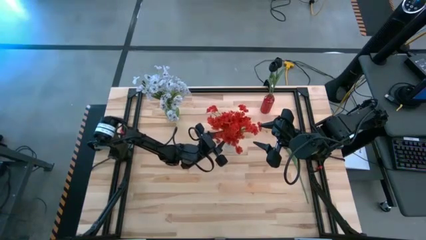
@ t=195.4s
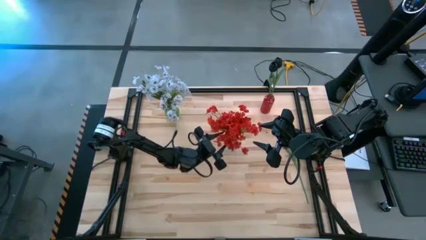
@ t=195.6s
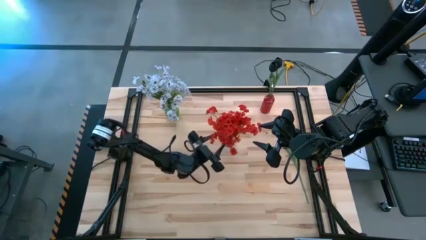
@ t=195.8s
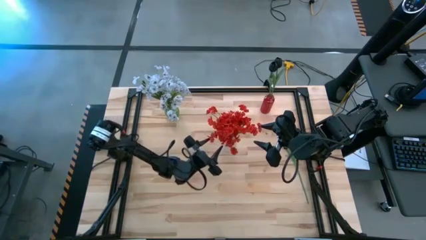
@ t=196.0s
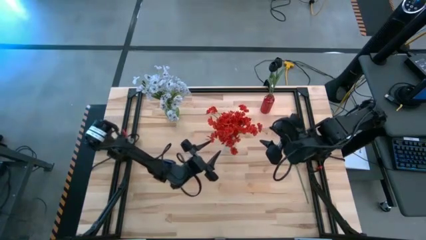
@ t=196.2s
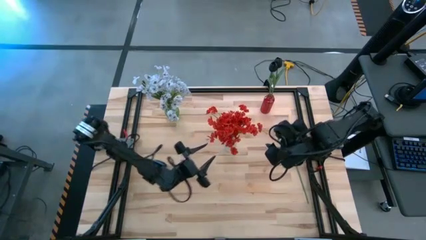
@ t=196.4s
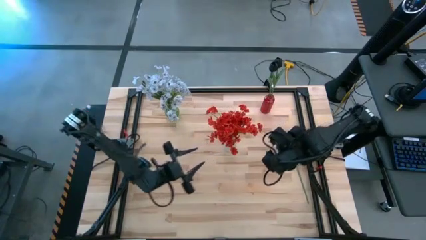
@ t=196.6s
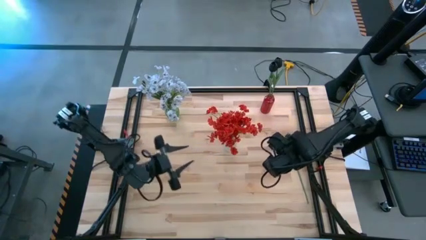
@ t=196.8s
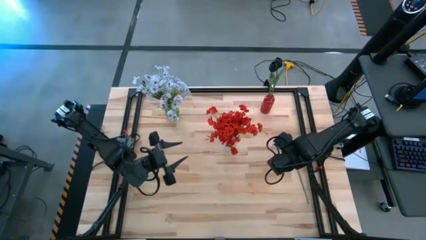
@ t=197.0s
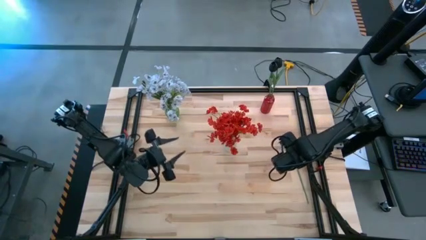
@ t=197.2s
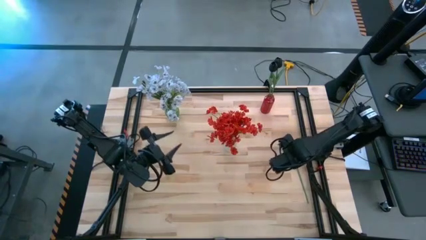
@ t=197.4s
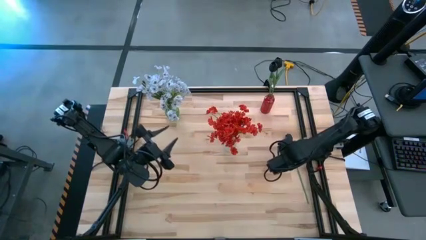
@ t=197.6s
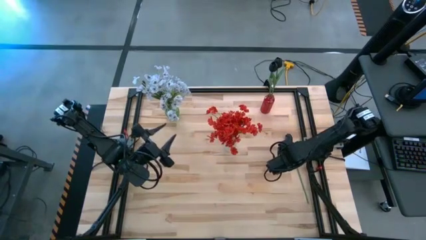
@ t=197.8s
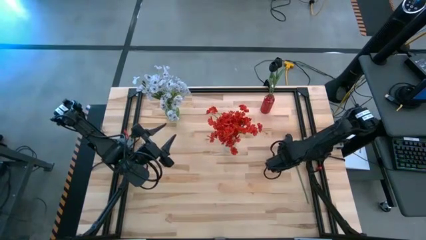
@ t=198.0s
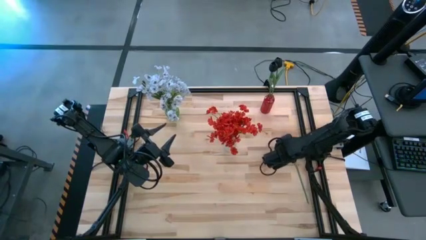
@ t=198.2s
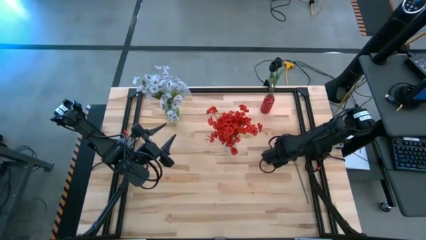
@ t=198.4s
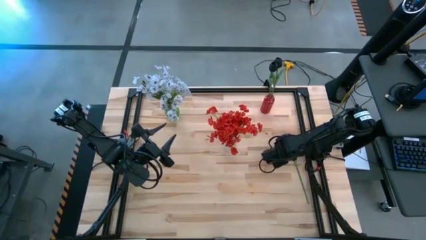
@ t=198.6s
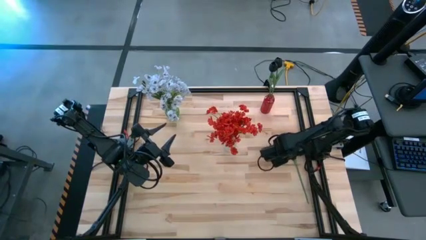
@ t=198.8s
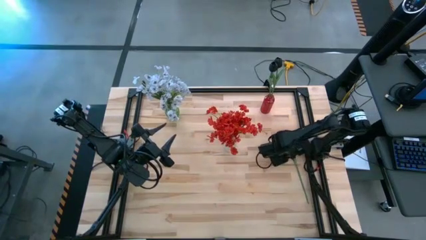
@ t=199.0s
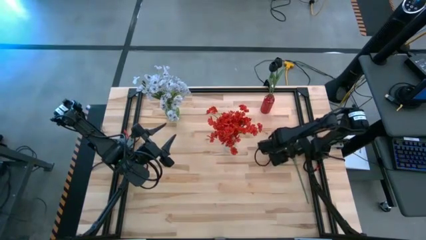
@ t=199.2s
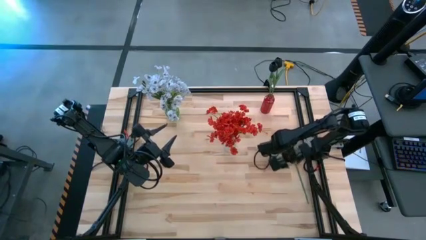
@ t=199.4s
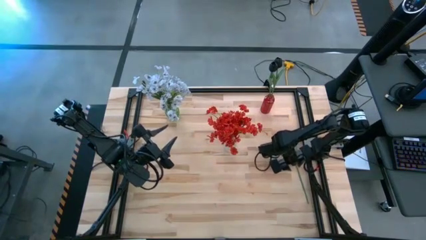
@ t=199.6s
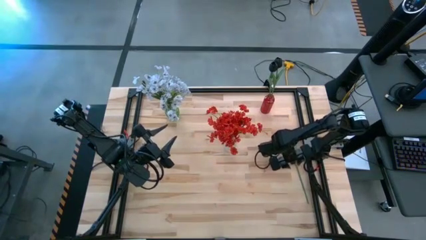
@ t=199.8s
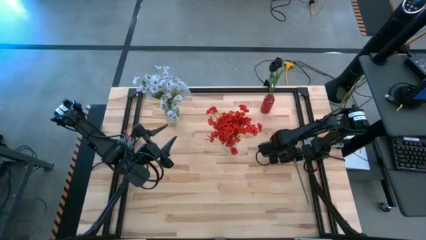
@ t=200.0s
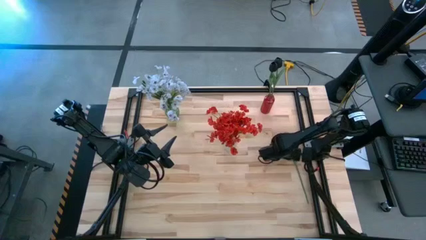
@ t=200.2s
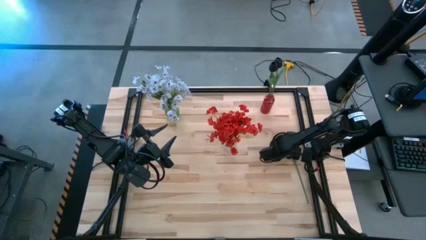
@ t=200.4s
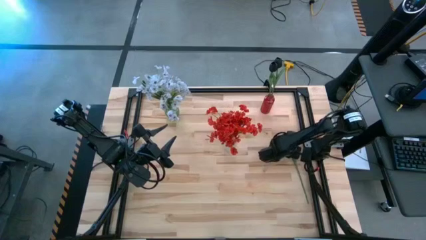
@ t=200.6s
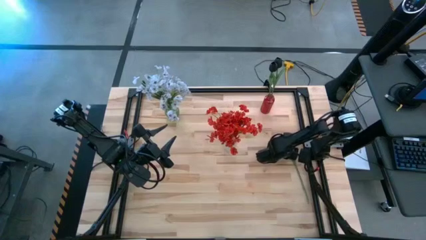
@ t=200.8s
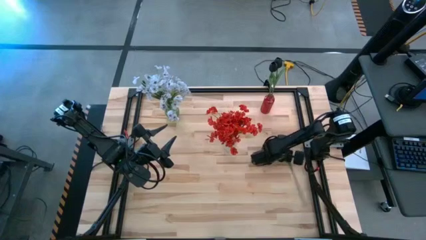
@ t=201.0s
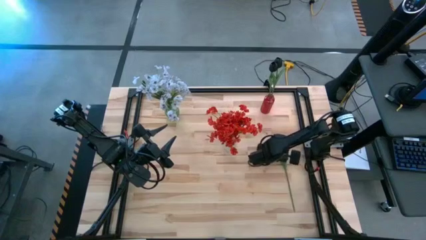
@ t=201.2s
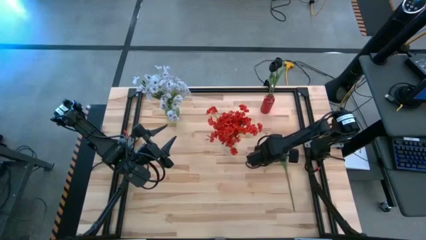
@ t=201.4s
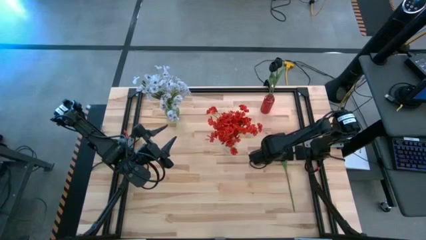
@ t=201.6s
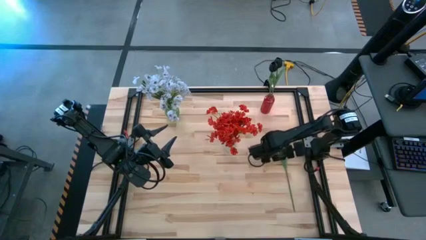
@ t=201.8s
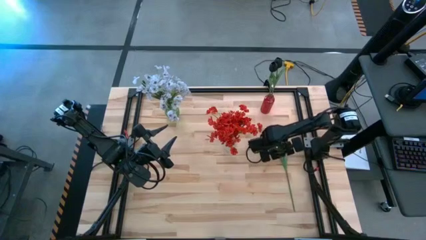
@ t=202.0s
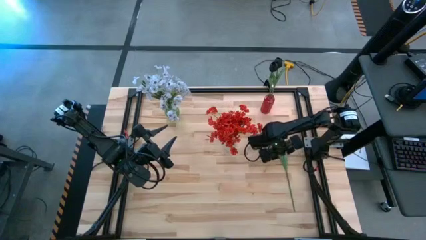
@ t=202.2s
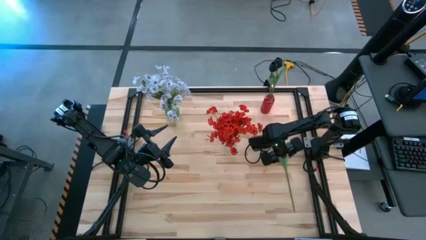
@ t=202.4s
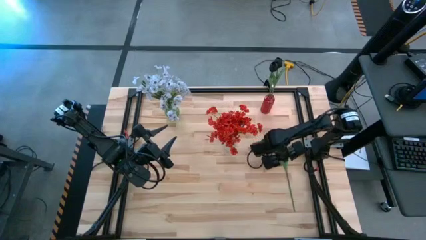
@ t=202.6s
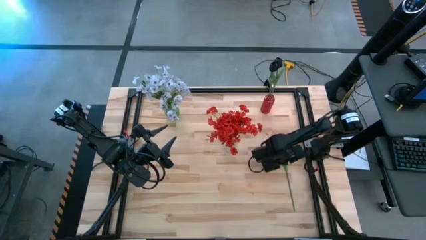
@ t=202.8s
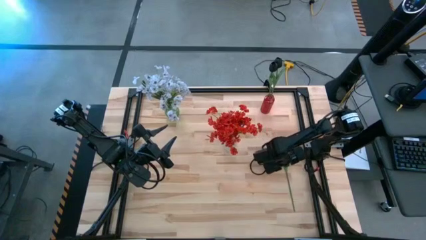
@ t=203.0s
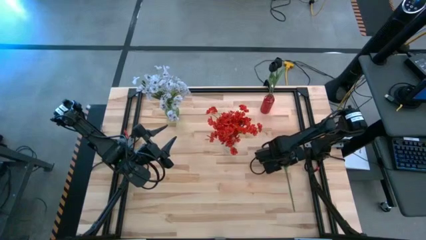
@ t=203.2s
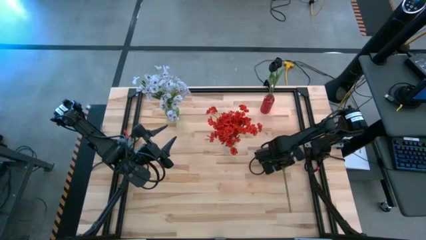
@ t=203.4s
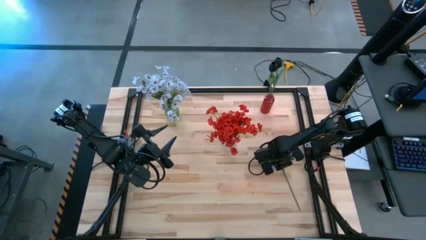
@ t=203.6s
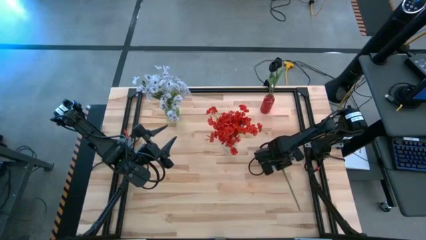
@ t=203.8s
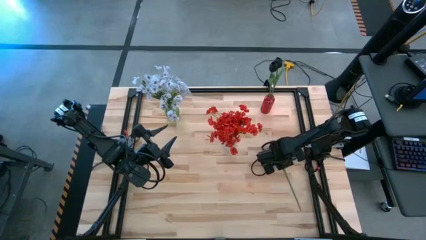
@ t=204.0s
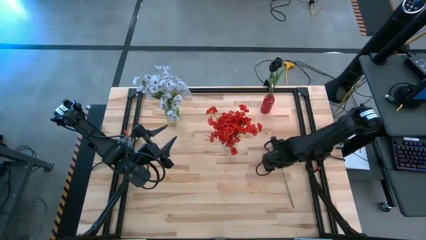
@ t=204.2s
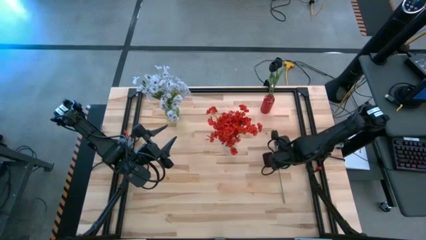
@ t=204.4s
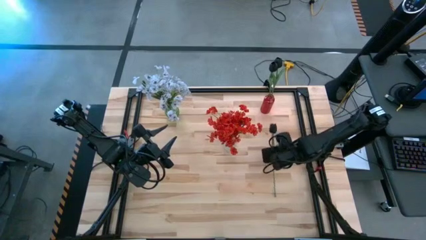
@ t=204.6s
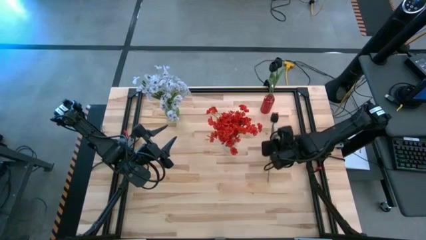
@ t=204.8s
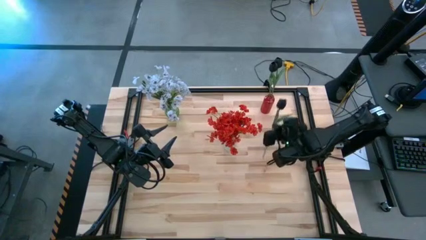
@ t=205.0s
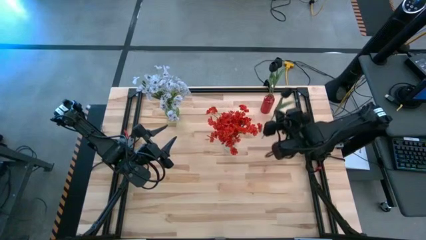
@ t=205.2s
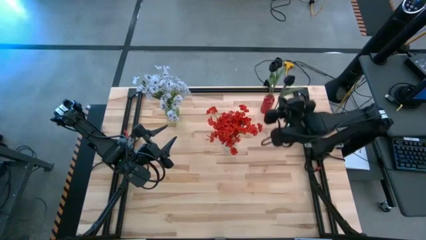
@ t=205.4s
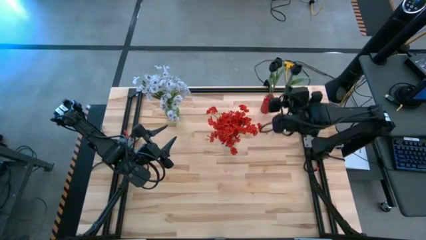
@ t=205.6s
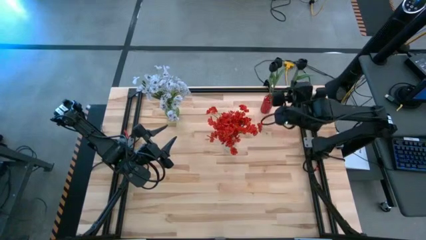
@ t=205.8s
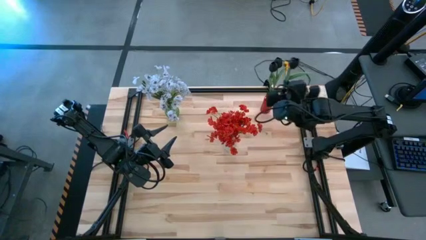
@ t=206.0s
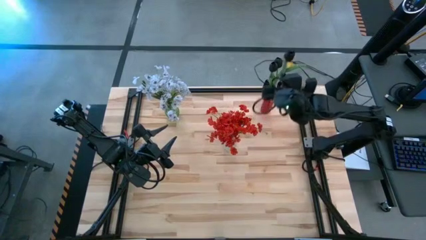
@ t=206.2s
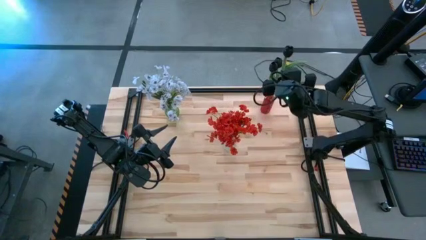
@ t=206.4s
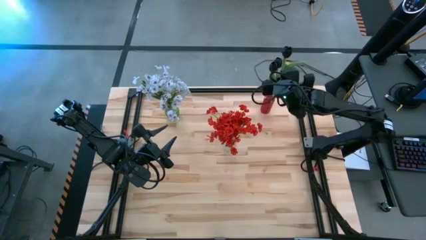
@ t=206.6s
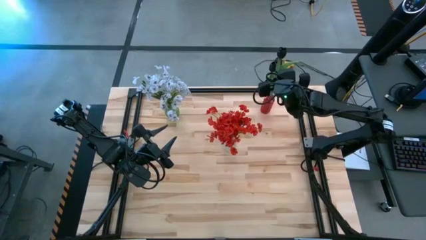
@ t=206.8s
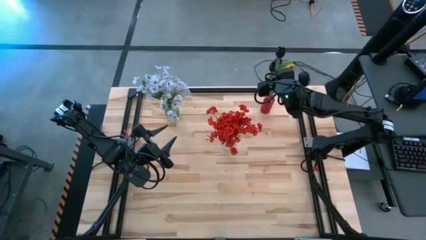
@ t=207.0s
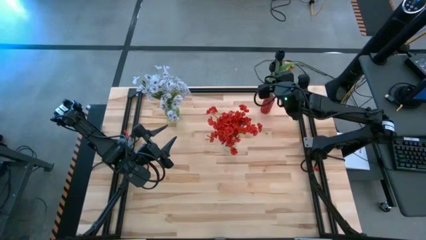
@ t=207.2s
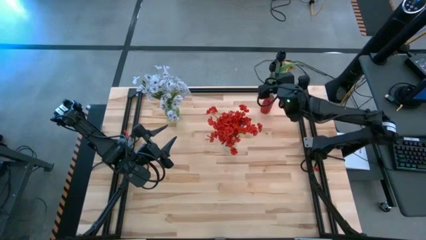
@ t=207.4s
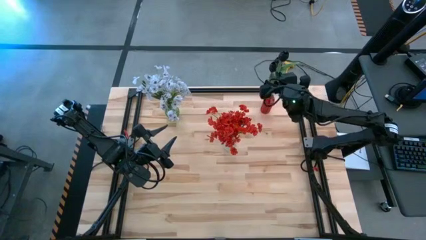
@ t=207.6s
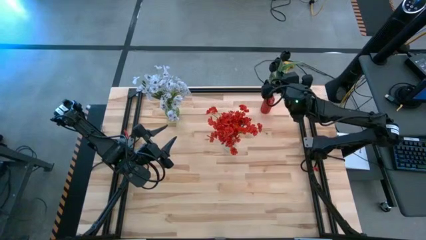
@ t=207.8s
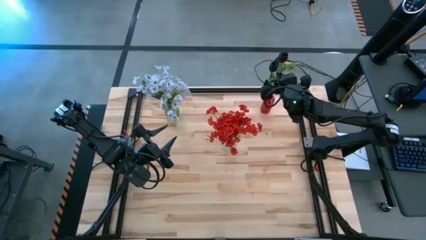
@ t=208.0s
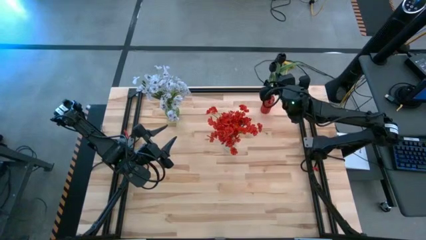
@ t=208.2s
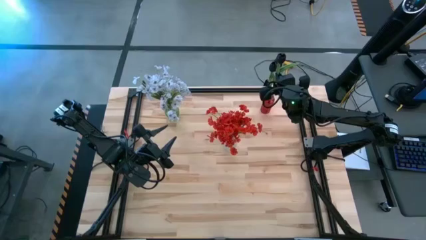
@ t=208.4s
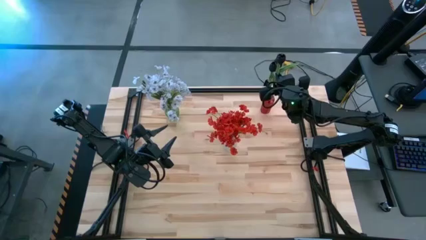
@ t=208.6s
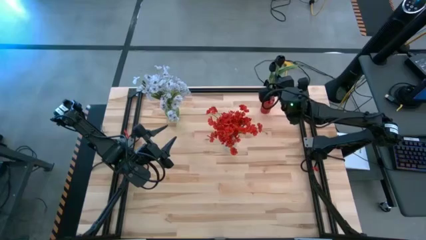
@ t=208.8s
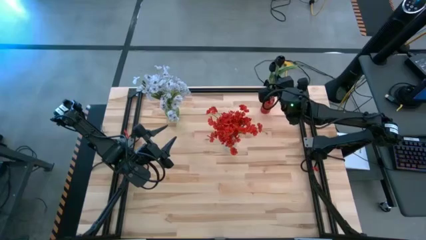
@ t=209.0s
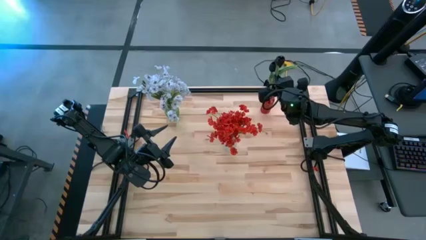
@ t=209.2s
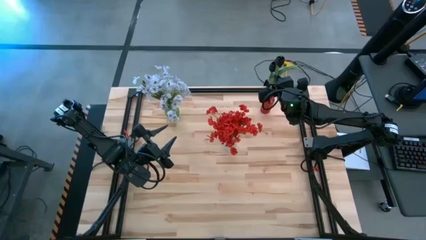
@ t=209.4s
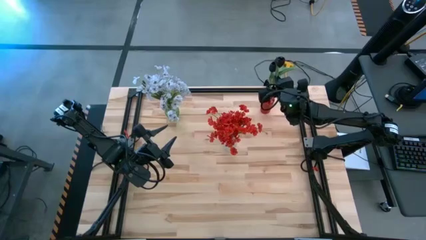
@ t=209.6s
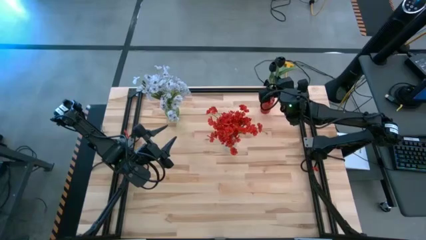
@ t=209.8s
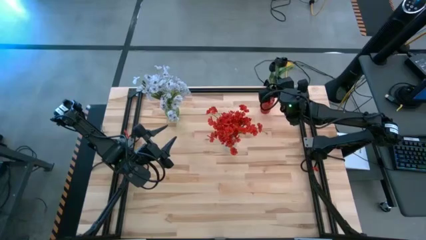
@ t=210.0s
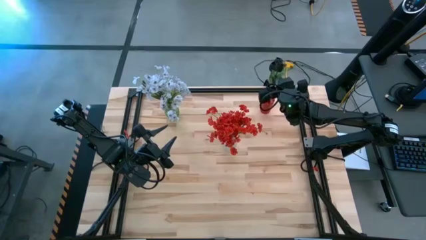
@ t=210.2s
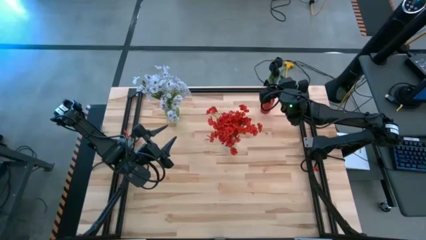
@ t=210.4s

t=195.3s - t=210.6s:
Task: Sort flowers into vase by color
Put the black flower into the red vase
